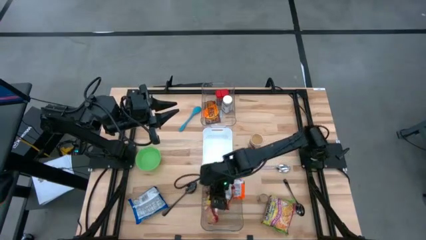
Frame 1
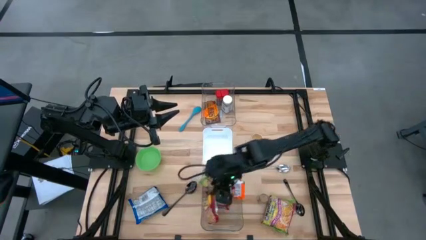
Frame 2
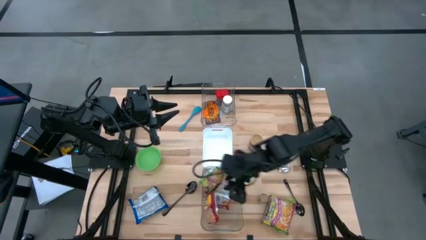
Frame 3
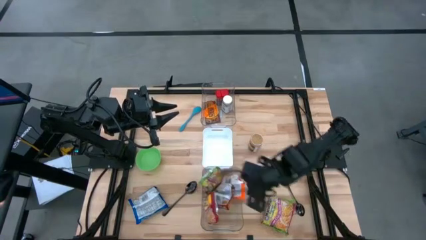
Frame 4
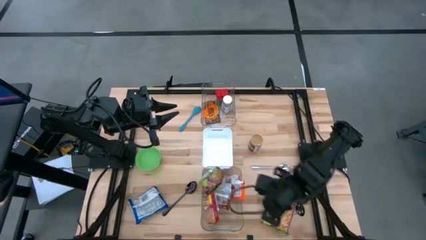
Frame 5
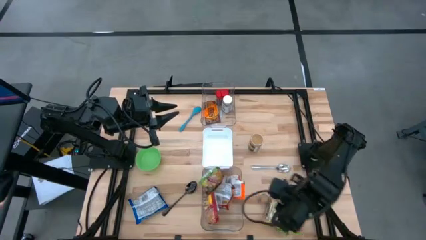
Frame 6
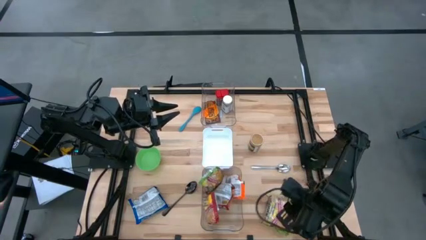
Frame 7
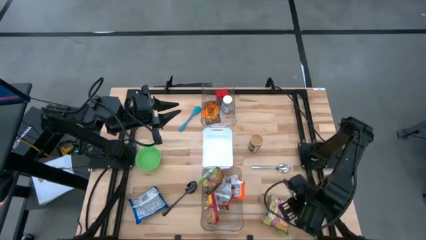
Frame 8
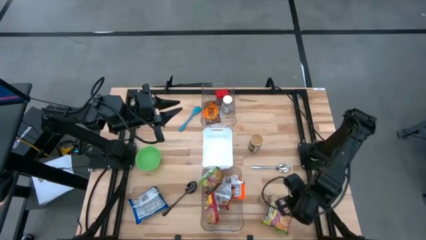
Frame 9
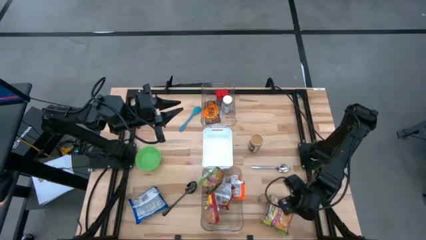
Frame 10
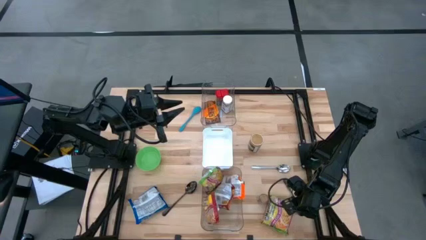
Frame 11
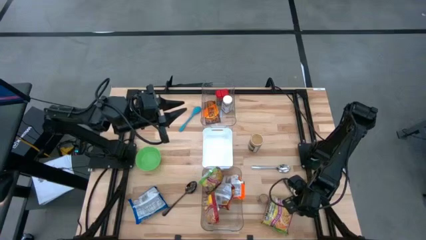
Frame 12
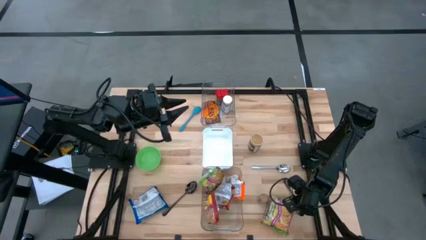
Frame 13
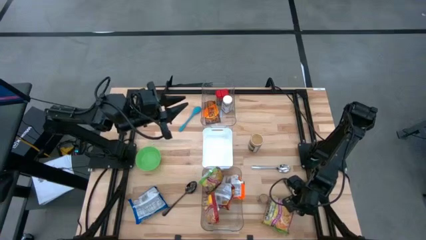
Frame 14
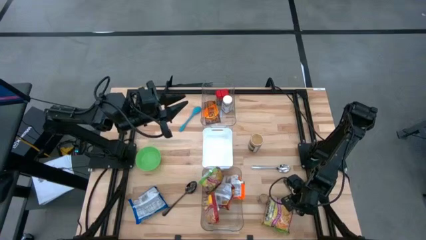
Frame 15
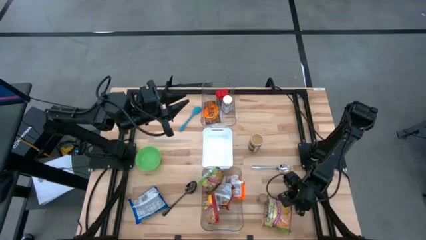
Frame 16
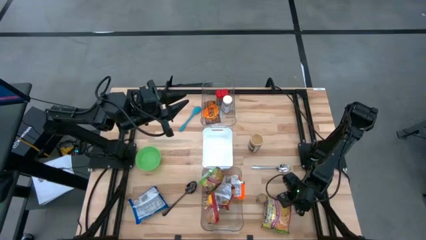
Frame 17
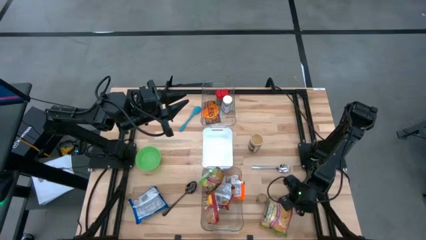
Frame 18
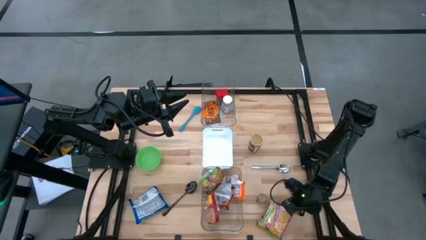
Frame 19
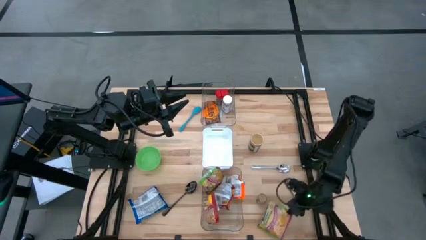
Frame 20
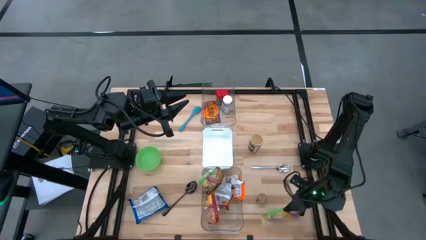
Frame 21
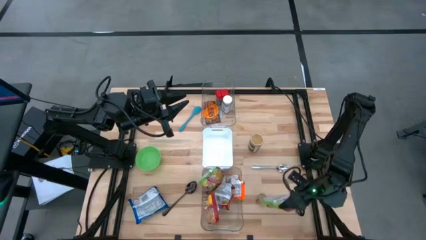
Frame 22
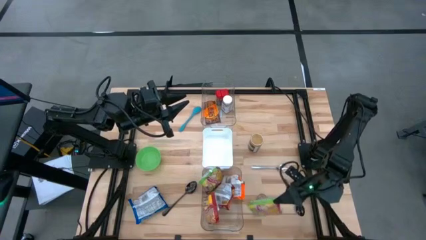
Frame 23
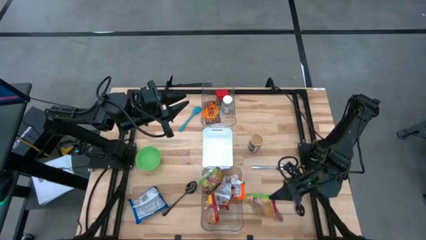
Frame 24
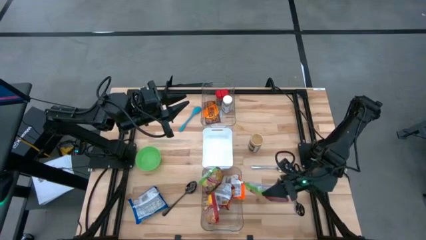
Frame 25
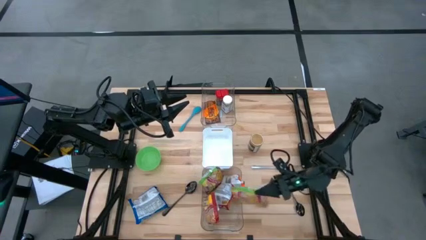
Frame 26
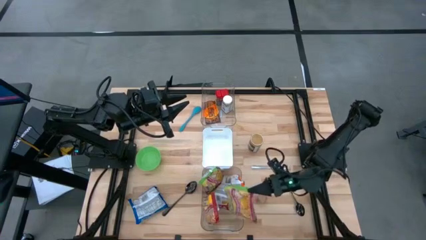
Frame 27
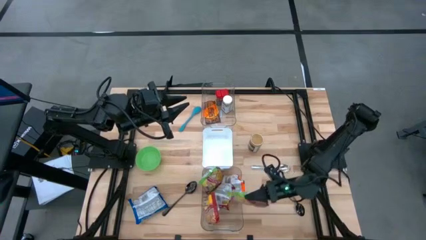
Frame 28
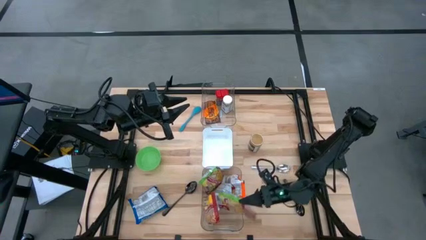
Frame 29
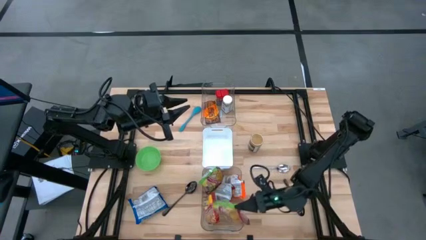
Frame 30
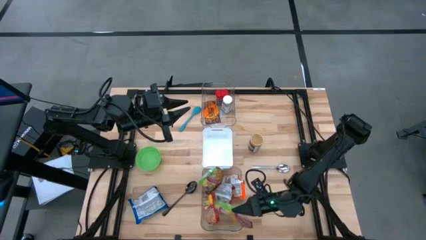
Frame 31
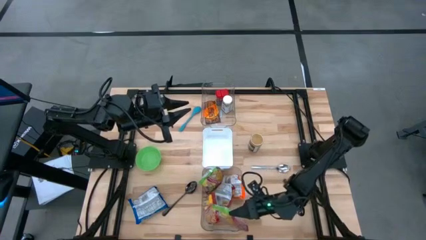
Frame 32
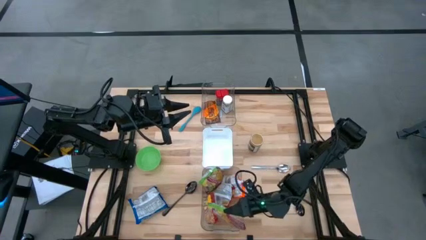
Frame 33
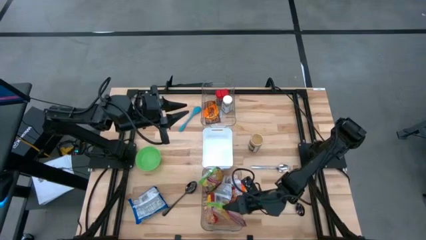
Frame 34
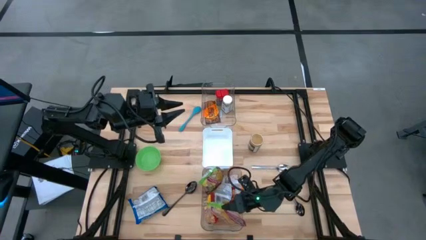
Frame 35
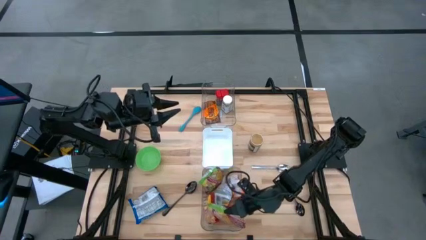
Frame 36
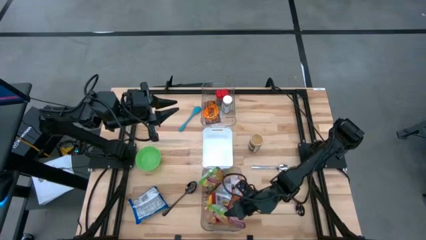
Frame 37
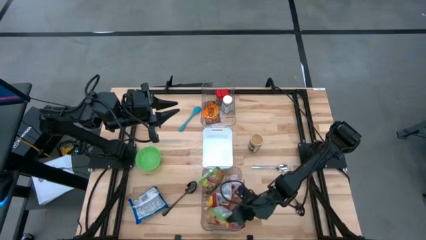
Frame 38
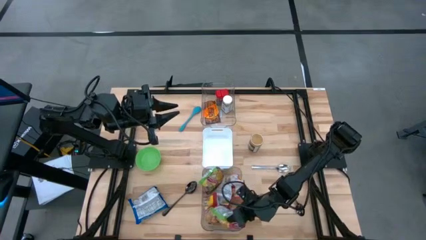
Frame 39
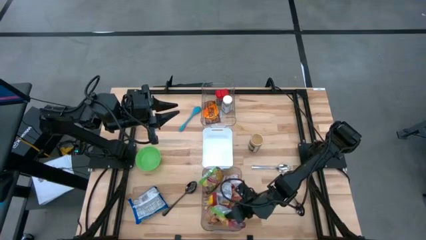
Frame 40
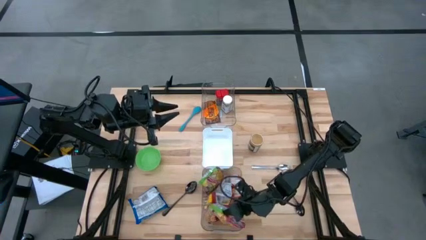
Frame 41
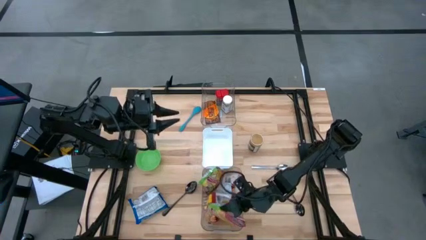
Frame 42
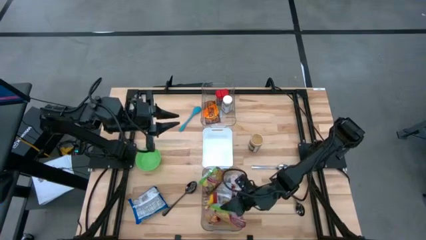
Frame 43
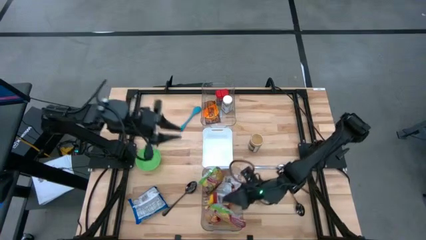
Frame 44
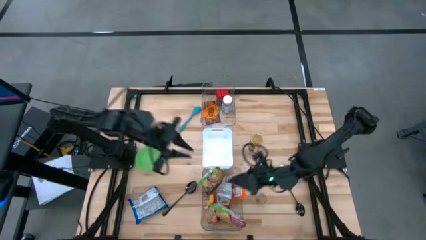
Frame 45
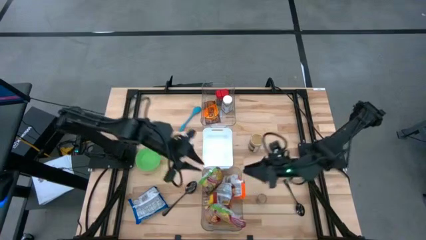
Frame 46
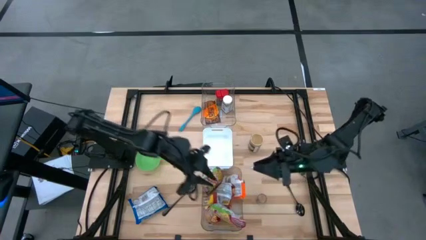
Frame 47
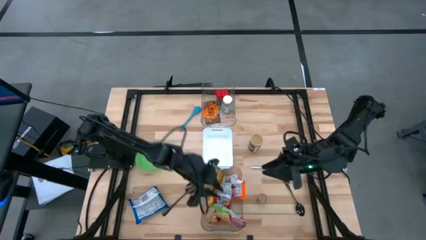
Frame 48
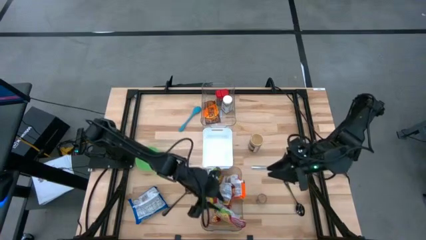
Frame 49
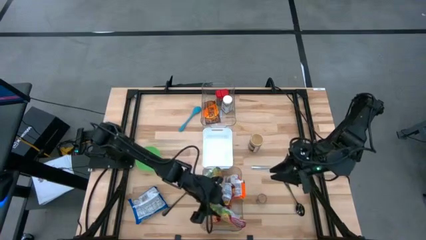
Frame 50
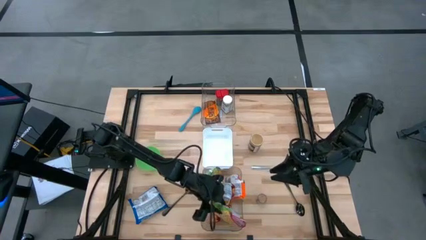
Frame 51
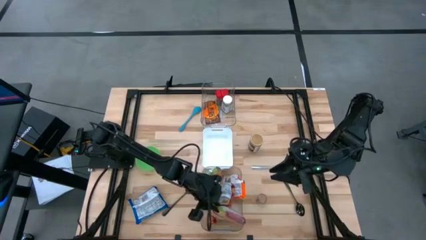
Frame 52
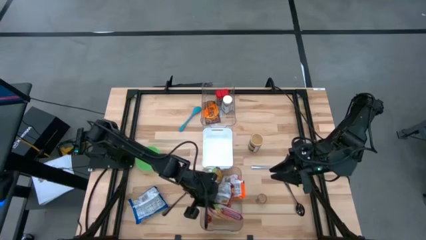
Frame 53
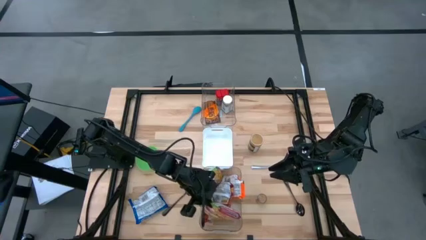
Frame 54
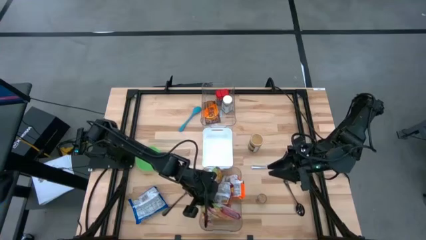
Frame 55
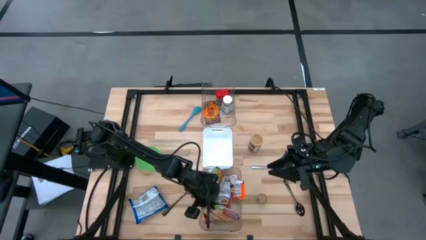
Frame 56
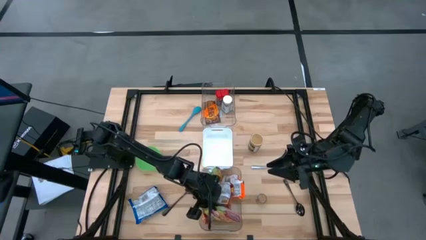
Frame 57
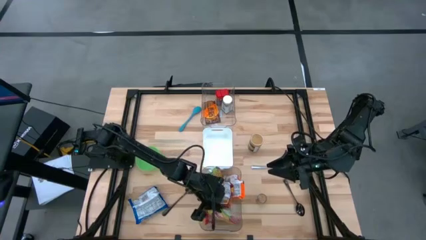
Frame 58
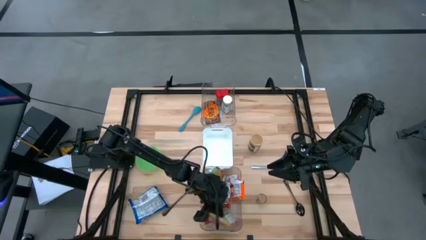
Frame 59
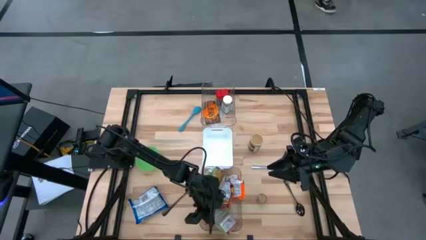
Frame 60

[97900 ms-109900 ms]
Task: Pick & Place Food Item
Put the green noodle pack into the bottom transparent bin

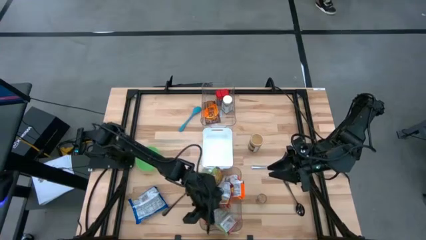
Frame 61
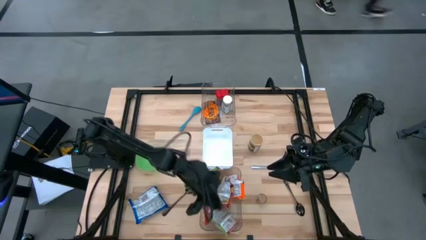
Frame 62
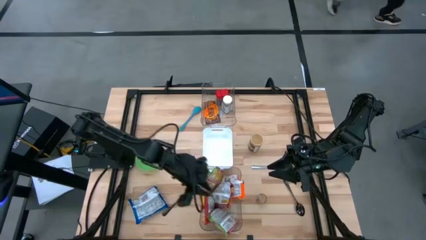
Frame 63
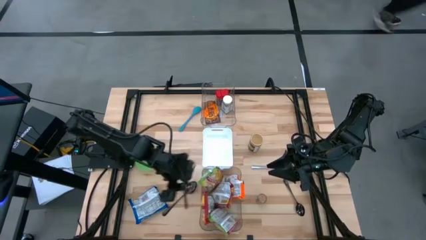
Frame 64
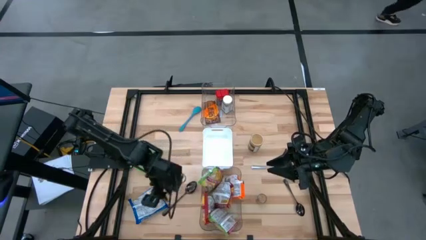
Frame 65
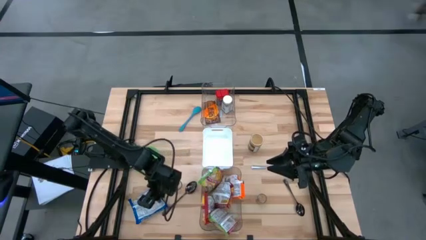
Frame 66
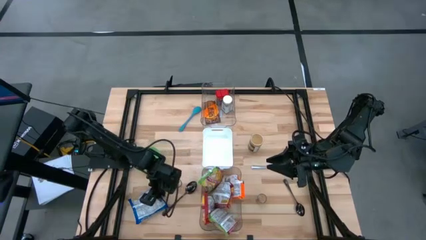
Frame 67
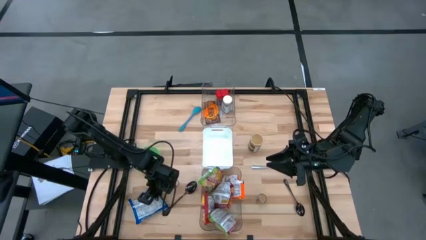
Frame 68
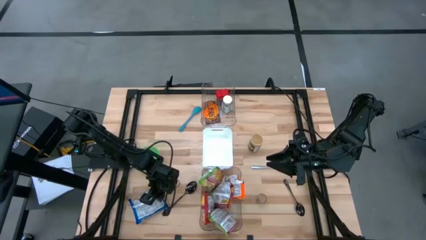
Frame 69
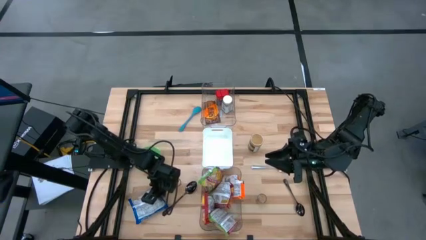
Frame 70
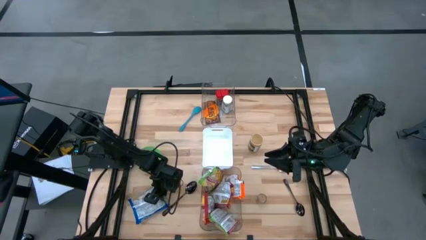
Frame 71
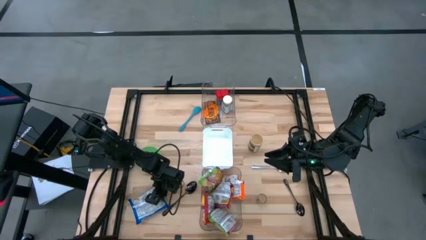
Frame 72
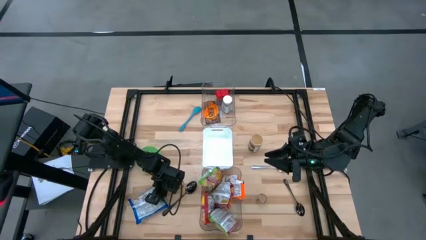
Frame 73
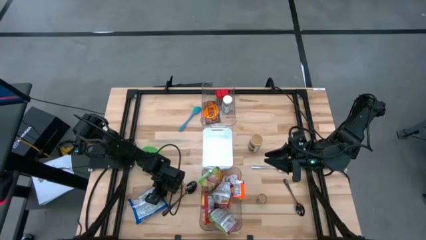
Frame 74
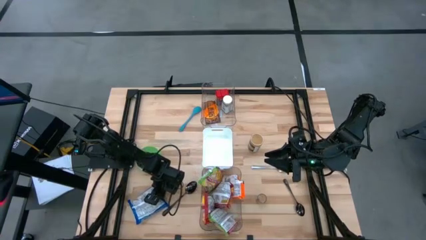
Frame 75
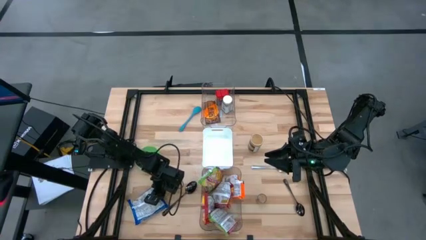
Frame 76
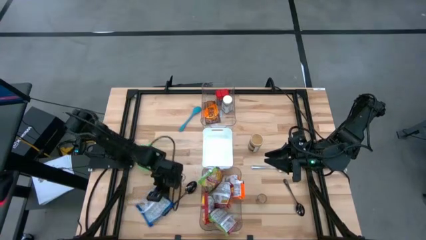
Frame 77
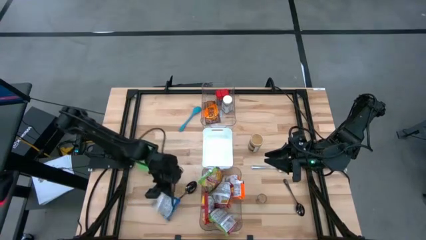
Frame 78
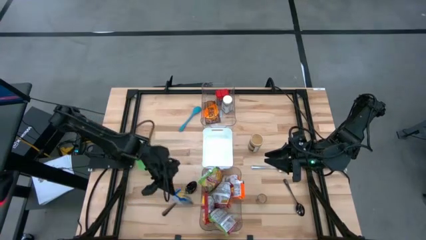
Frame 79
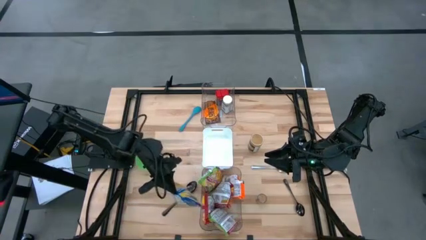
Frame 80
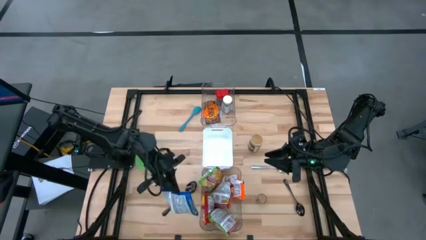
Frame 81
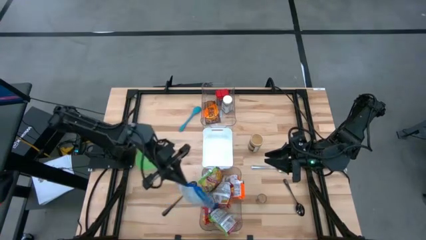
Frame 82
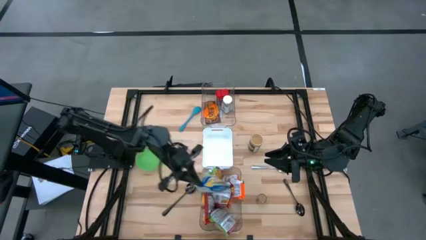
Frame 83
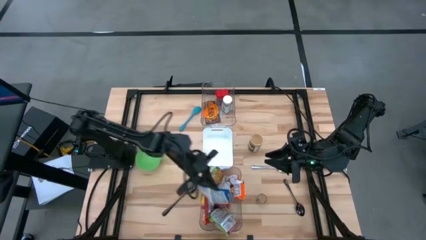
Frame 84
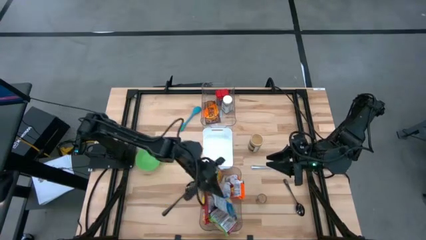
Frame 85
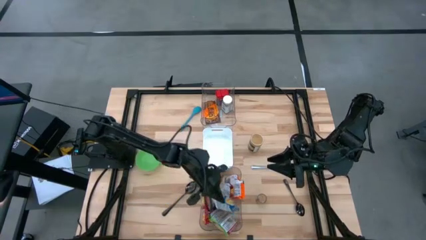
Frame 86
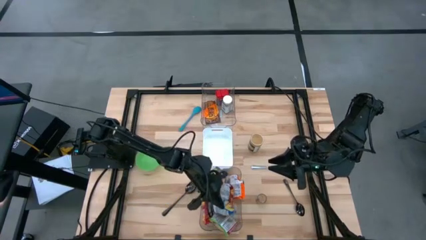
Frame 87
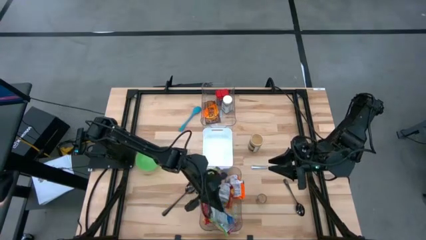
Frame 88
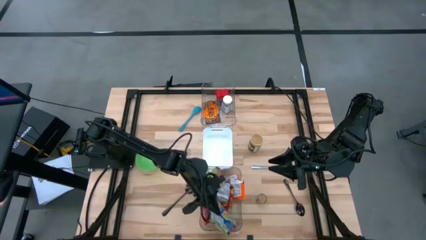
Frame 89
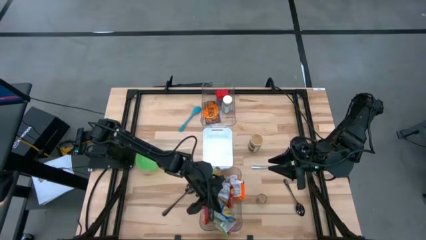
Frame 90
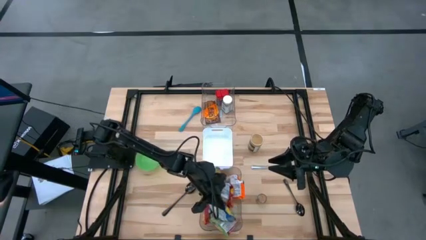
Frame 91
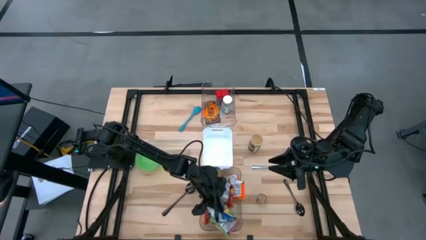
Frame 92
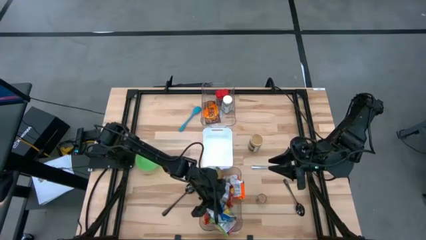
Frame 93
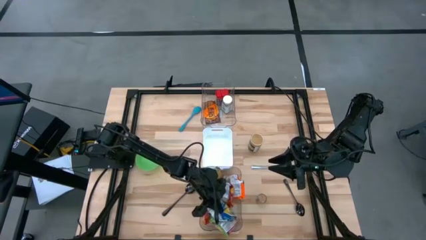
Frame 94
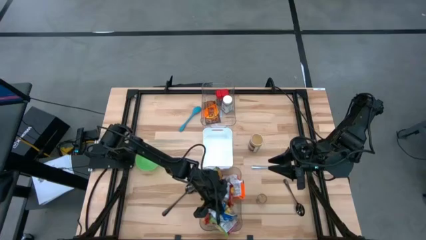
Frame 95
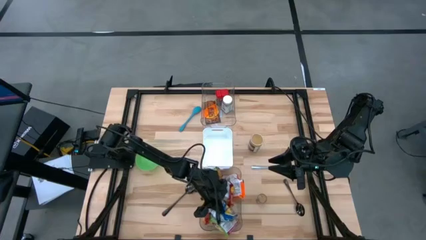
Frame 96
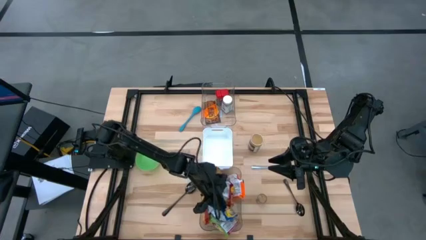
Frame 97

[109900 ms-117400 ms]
Put the blue noodle pack into the bottom transparent bin
